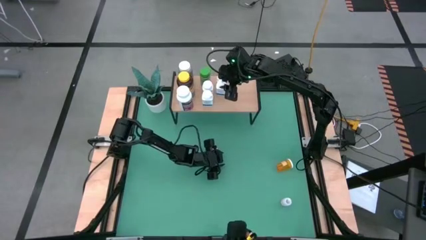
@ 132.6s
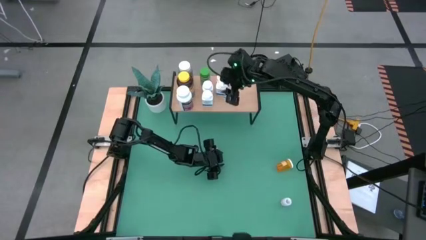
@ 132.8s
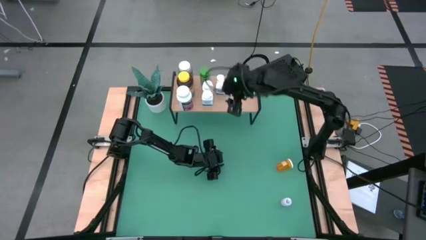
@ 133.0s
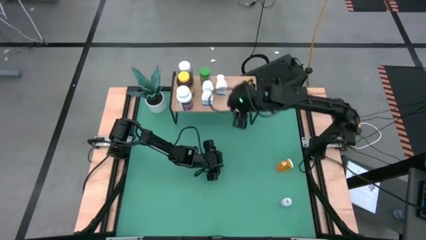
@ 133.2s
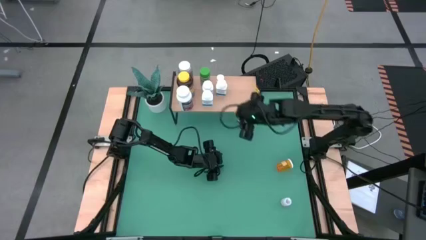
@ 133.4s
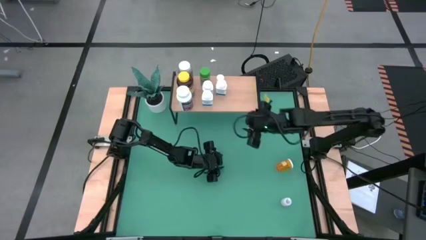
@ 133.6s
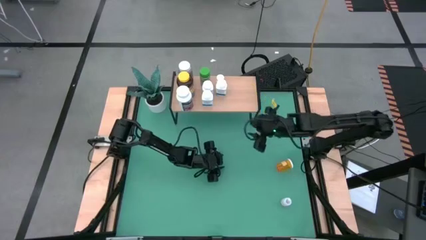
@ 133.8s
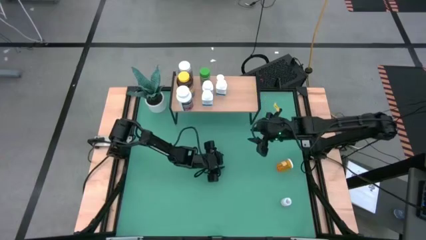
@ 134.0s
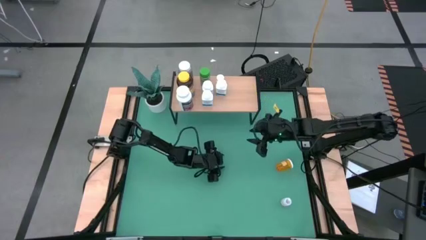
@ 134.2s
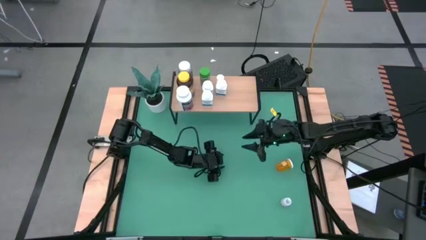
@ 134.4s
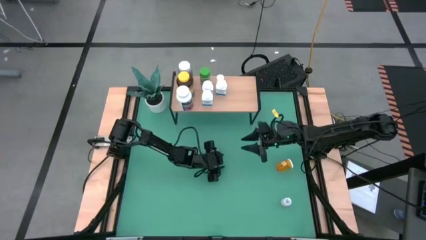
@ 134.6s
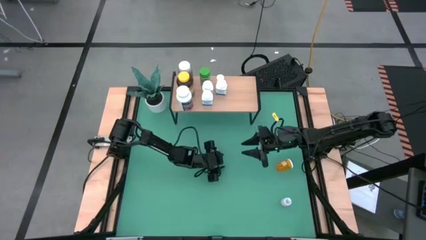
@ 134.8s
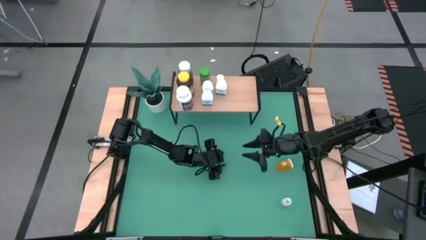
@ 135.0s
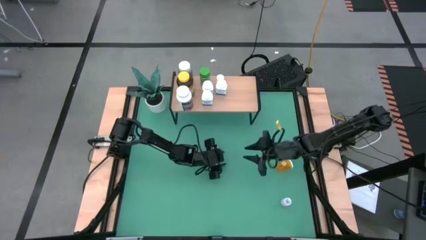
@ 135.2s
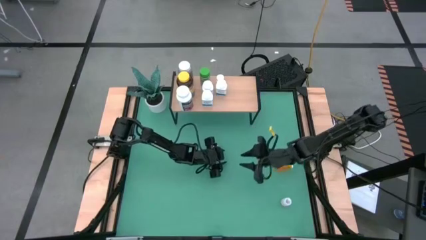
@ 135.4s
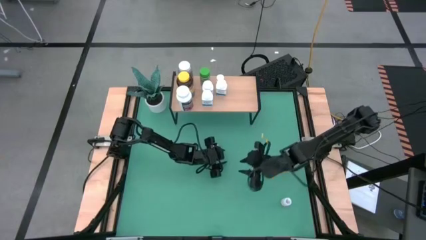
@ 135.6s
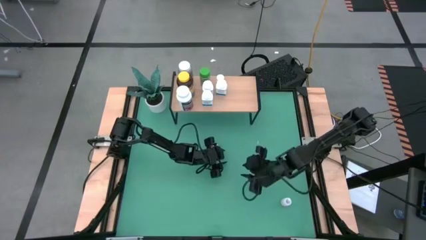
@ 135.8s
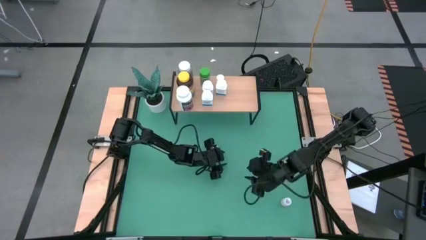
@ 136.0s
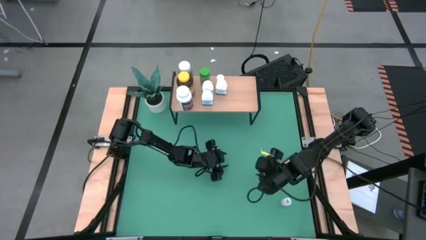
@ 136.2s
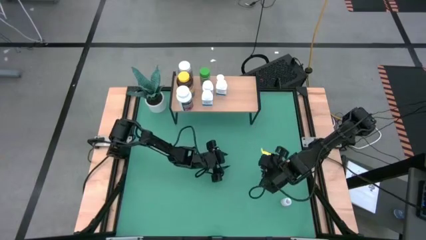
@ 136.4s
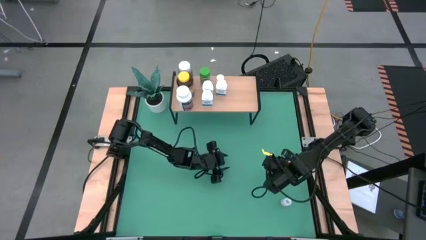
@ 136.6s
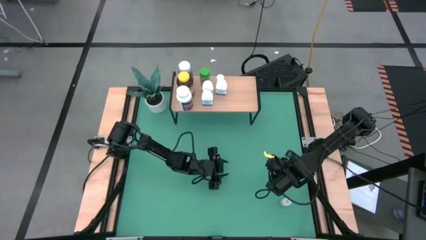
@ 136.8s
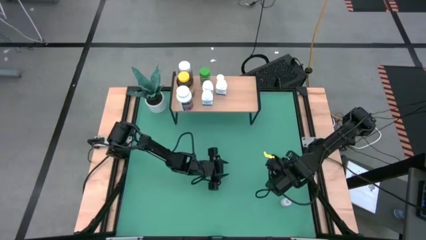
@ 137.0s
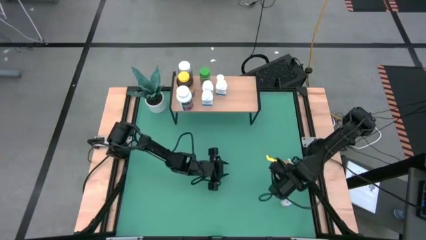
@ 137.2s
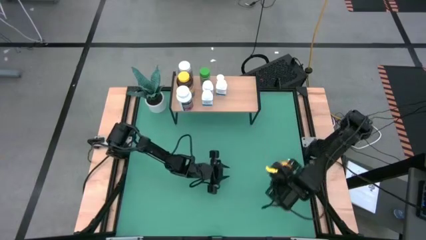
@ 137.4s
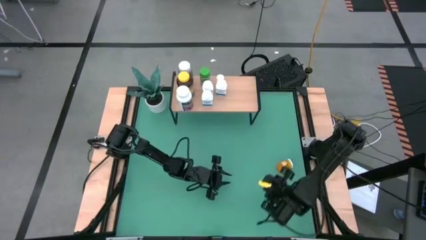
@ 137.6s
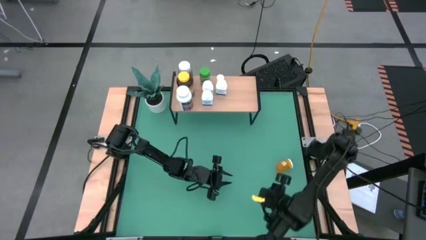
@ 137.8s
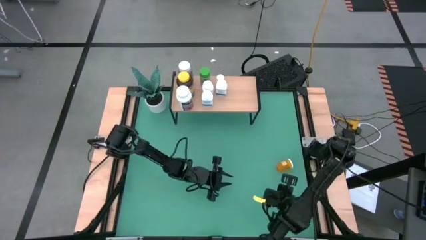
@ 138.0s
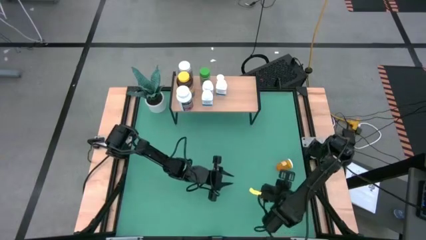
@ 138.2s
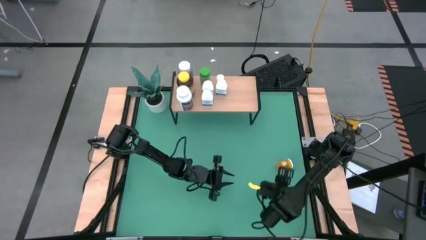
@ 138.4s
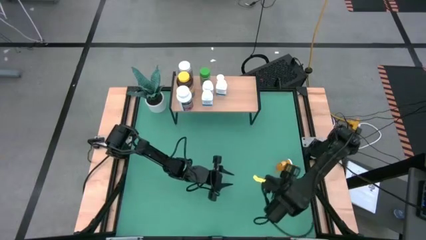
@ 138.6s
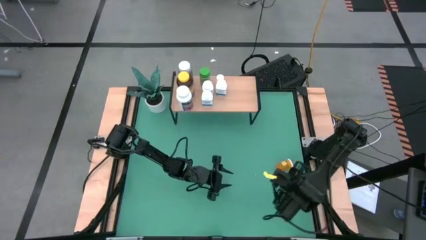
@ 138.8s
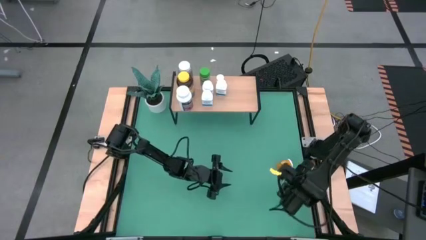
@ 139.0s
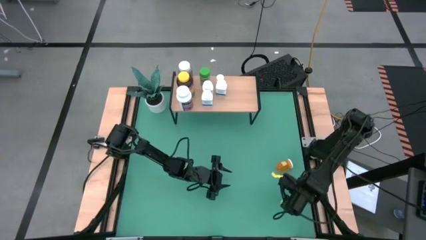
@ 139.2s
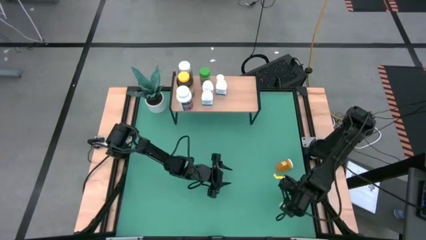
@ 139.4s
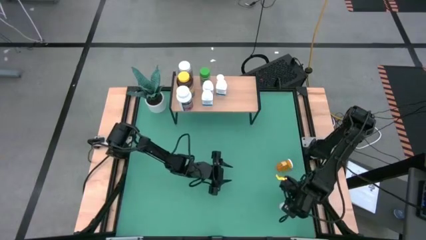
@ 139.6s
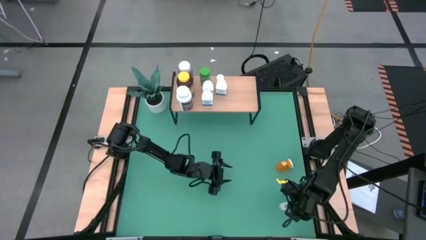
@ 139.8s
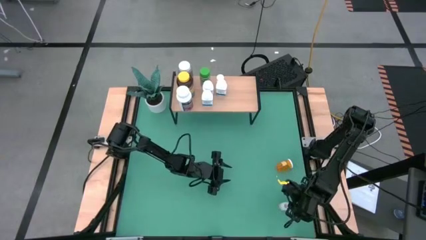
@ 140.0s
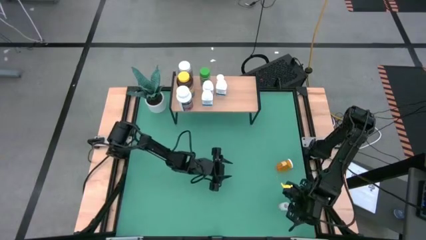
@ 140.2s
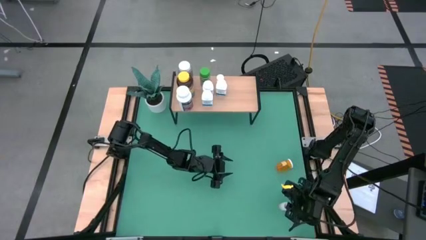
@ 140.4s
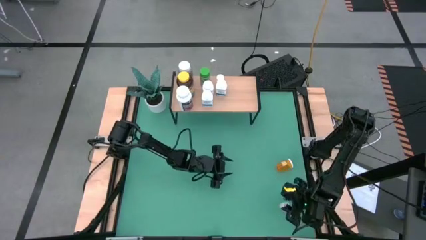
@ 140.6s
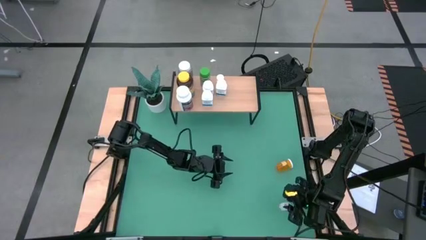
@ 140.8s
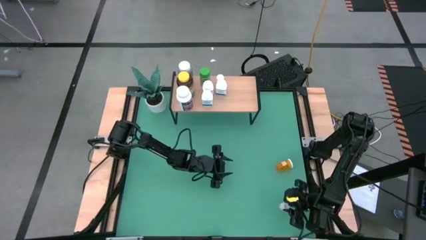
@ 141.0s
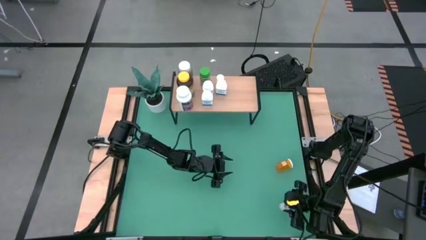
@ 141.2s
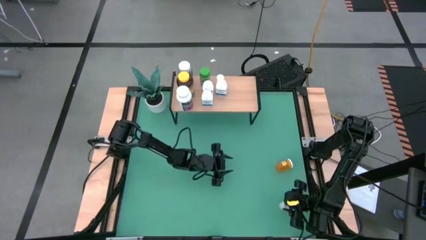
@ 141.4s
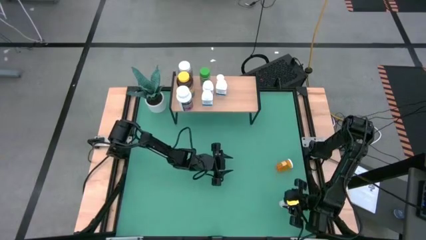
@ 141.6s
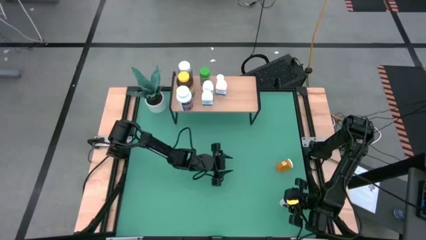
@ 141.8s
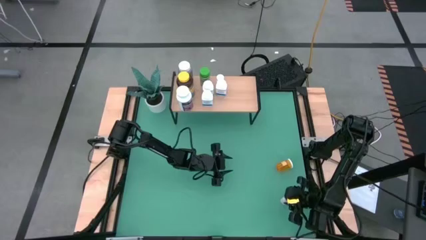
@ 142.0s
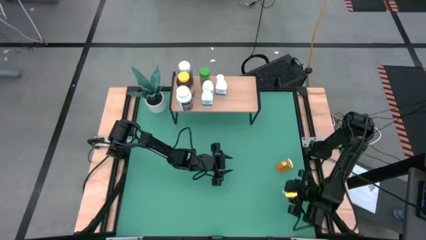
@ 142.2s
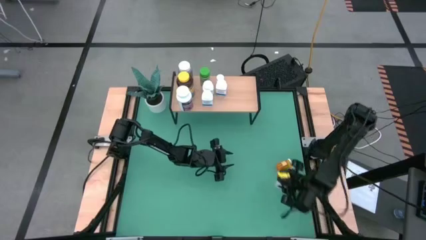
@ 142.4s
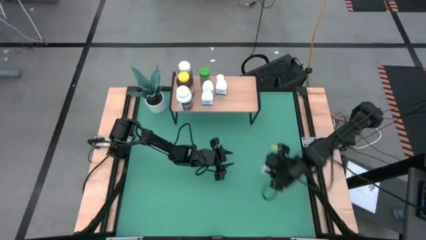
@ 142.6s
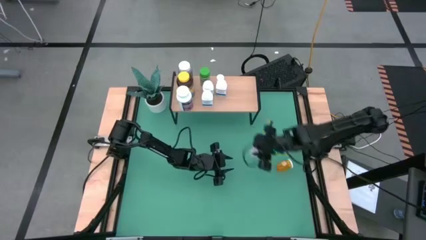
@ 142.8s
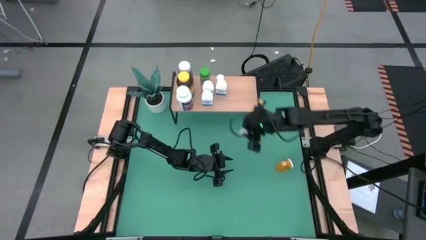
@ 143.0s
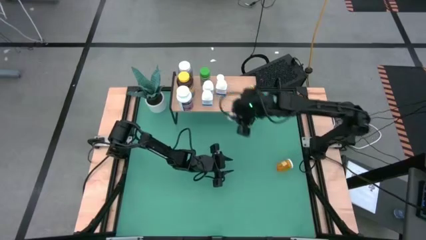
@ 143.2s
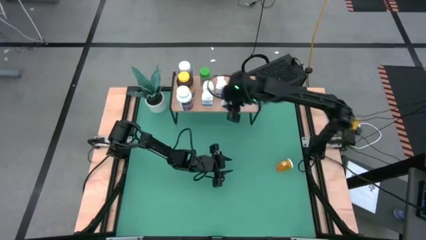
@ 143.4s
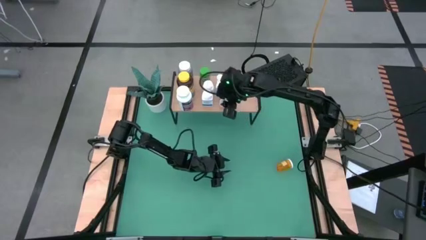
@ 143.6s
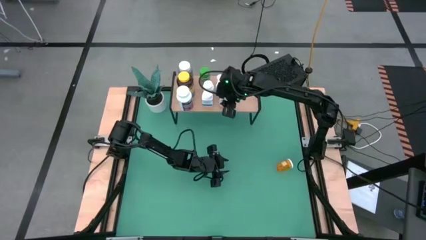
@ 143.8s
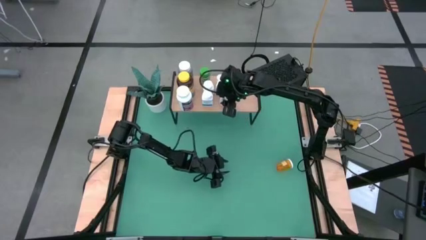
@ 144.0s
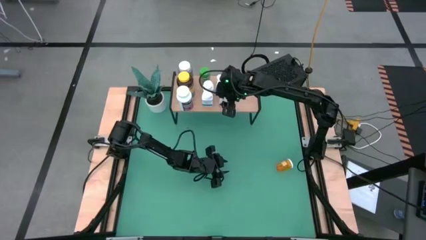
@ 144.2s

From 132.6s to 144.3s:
Task: Pick and place medicine bottles onto shelf by color
Put the transparent pill bottle on the shelf
